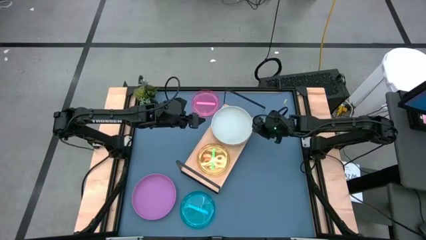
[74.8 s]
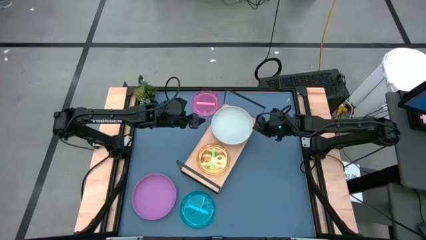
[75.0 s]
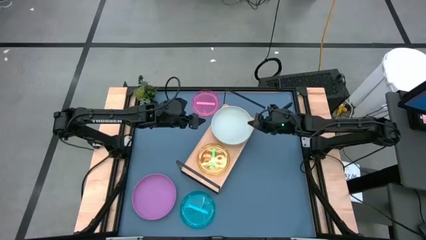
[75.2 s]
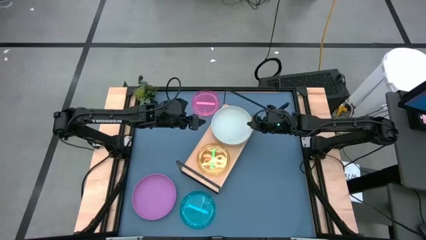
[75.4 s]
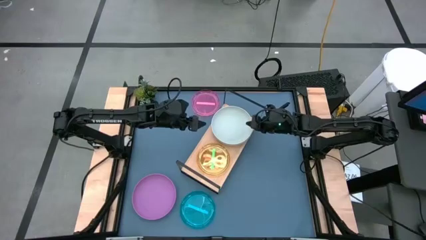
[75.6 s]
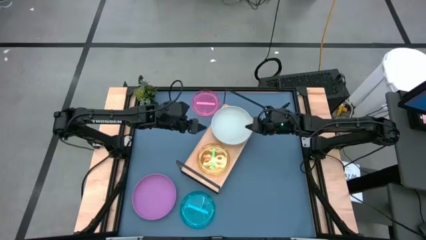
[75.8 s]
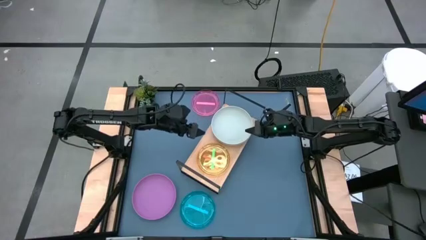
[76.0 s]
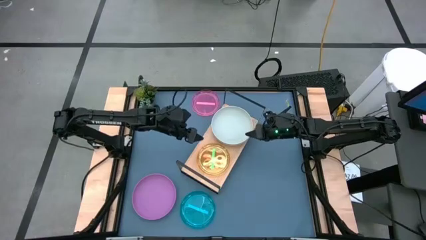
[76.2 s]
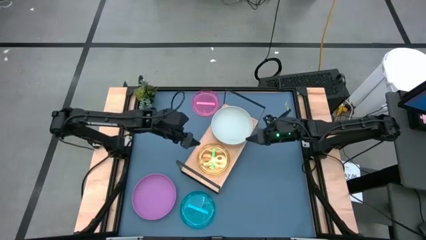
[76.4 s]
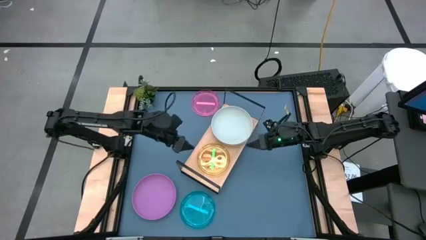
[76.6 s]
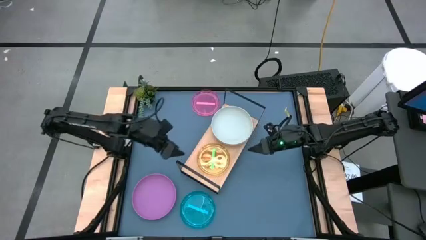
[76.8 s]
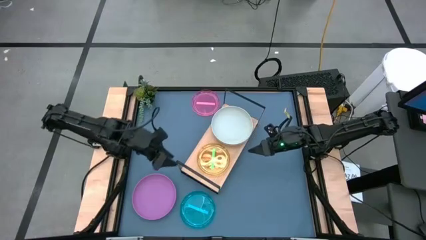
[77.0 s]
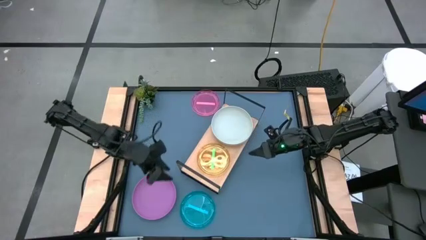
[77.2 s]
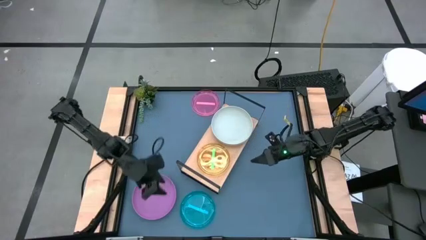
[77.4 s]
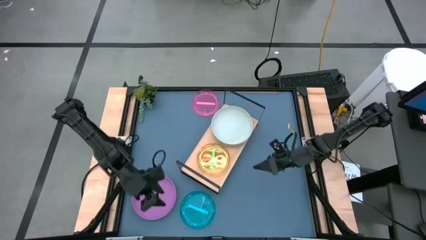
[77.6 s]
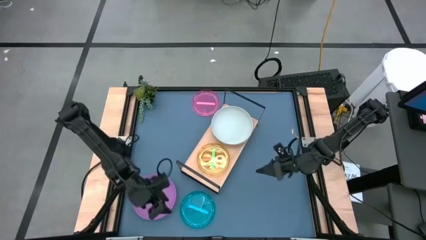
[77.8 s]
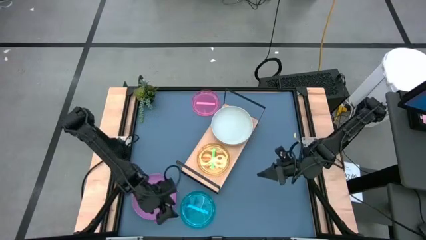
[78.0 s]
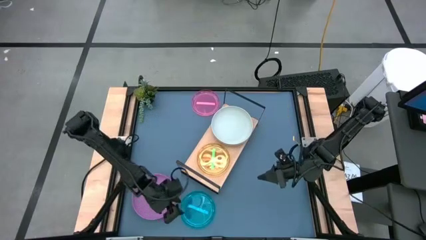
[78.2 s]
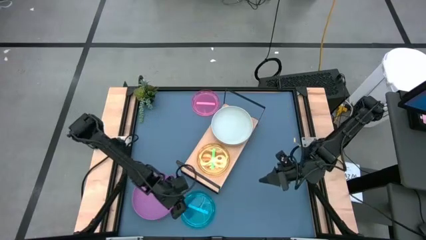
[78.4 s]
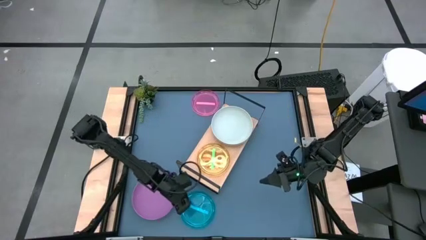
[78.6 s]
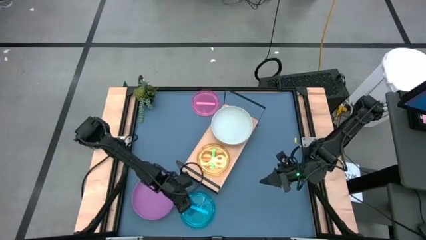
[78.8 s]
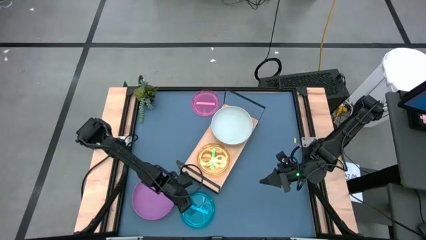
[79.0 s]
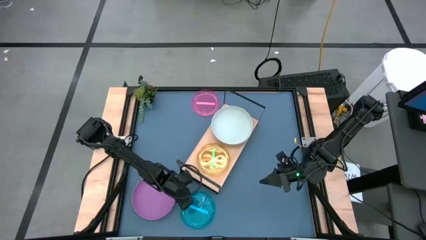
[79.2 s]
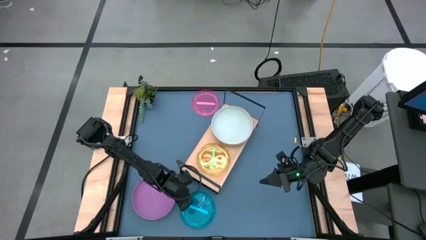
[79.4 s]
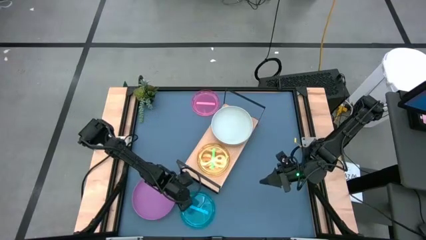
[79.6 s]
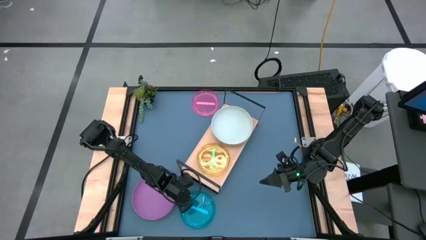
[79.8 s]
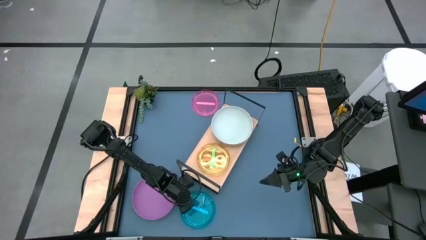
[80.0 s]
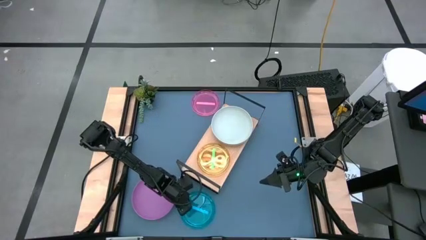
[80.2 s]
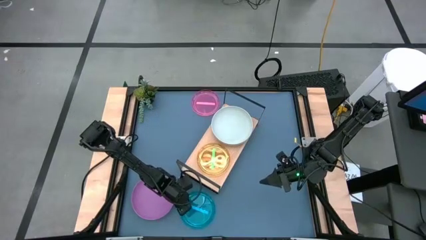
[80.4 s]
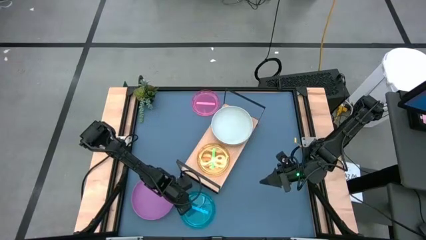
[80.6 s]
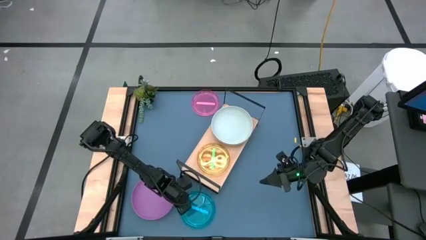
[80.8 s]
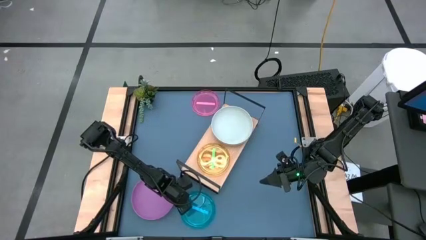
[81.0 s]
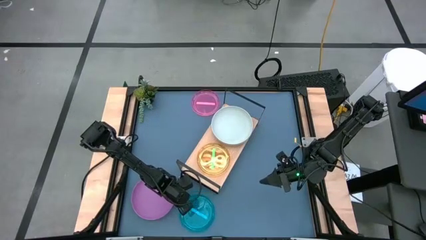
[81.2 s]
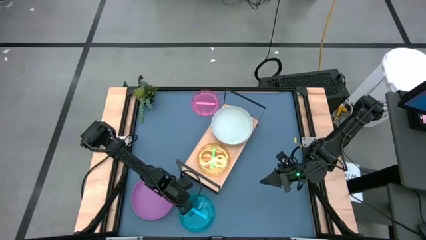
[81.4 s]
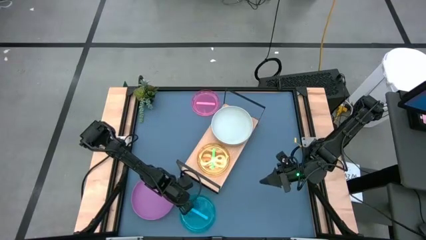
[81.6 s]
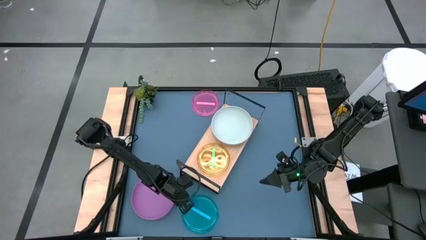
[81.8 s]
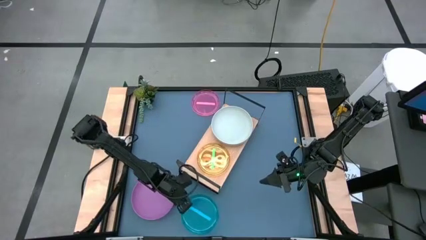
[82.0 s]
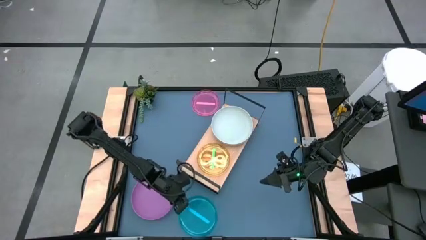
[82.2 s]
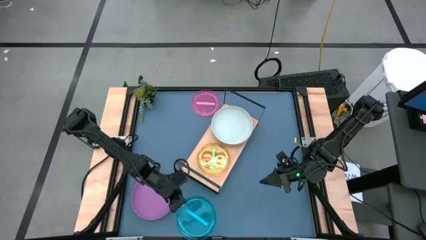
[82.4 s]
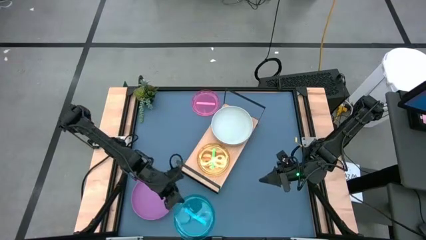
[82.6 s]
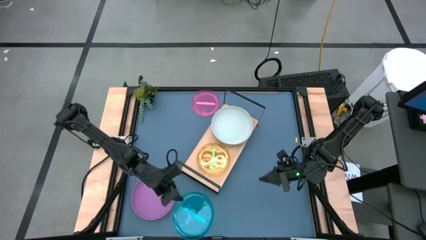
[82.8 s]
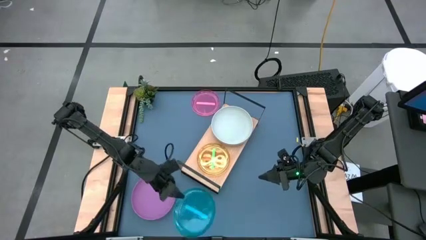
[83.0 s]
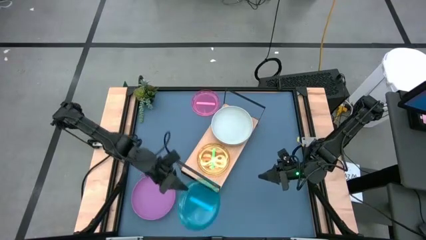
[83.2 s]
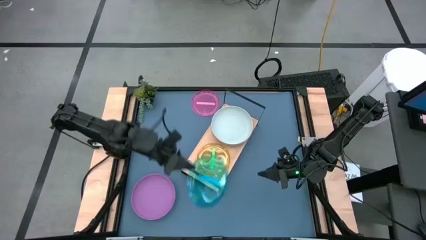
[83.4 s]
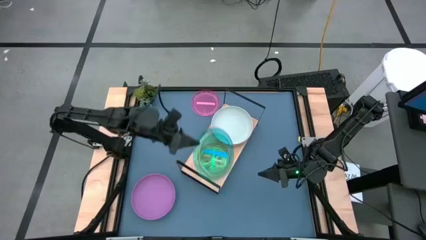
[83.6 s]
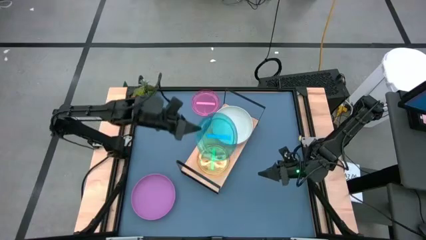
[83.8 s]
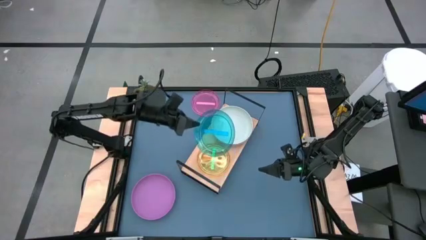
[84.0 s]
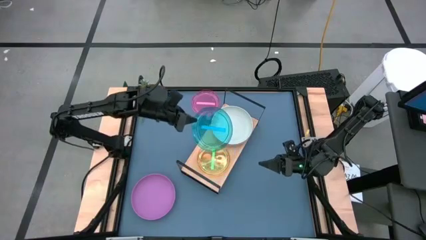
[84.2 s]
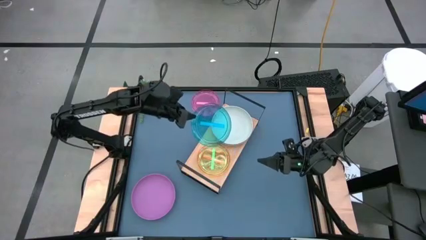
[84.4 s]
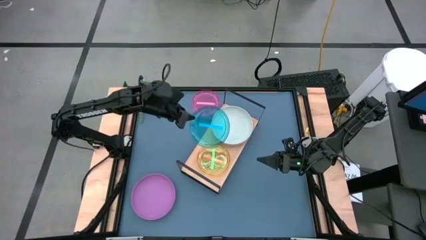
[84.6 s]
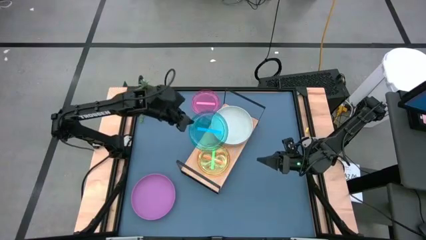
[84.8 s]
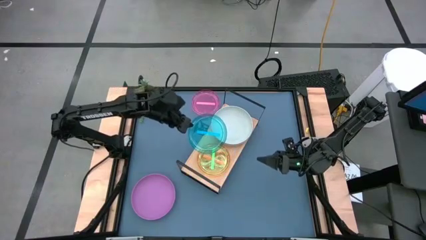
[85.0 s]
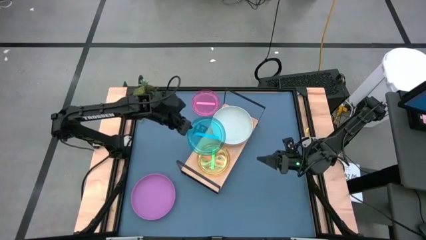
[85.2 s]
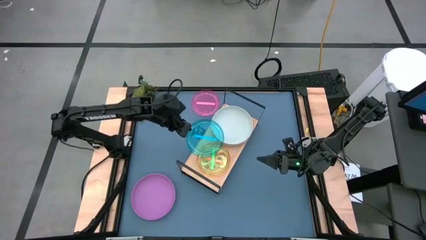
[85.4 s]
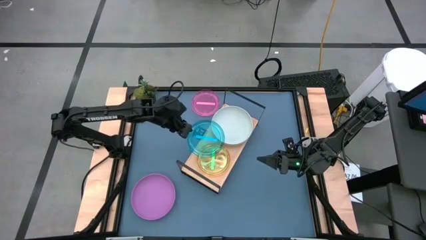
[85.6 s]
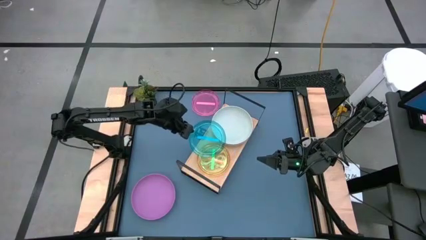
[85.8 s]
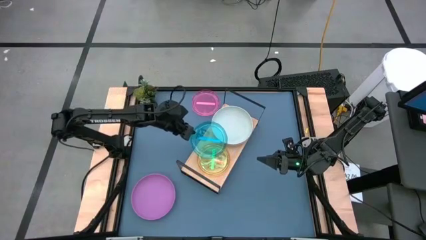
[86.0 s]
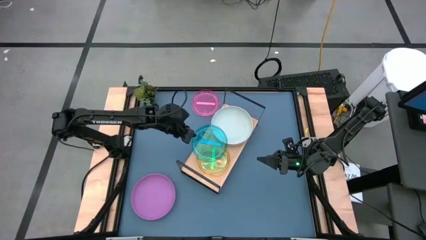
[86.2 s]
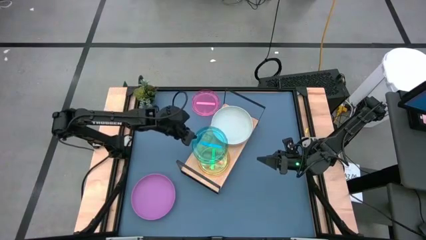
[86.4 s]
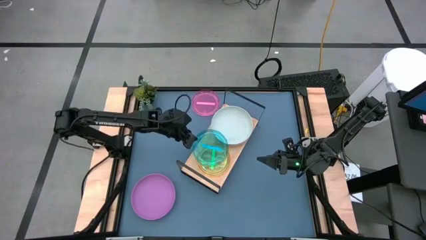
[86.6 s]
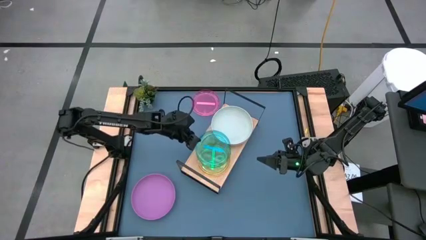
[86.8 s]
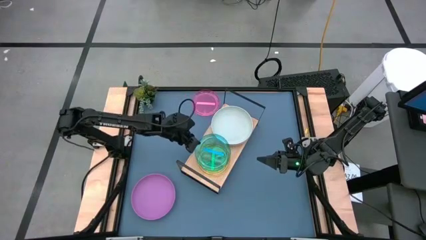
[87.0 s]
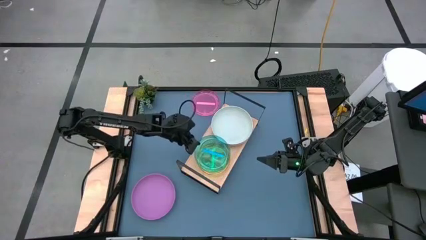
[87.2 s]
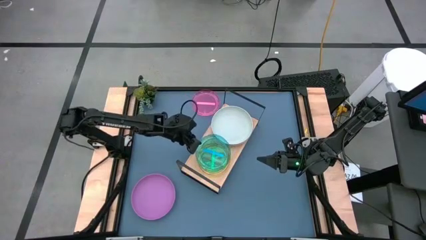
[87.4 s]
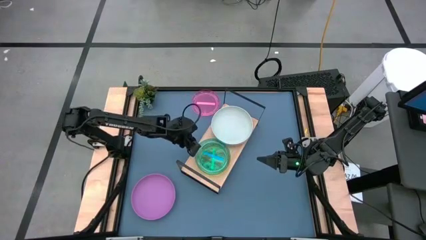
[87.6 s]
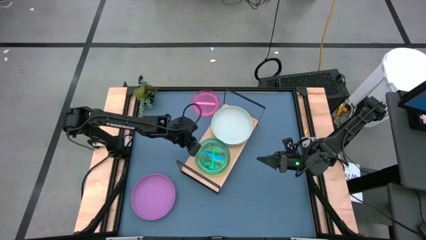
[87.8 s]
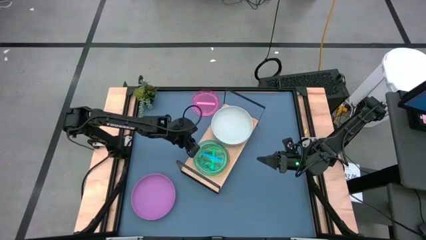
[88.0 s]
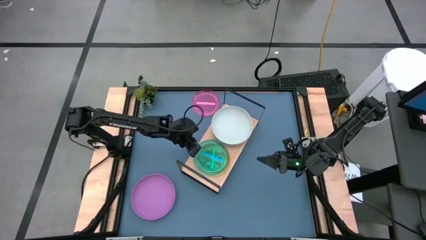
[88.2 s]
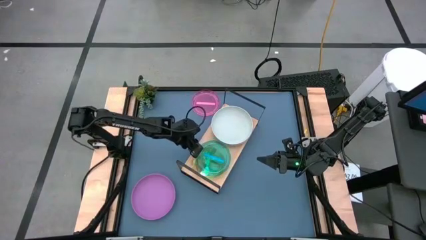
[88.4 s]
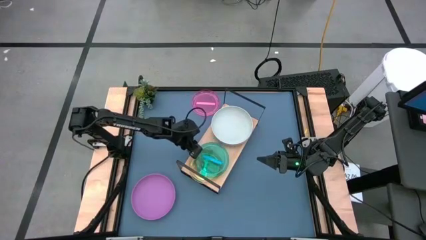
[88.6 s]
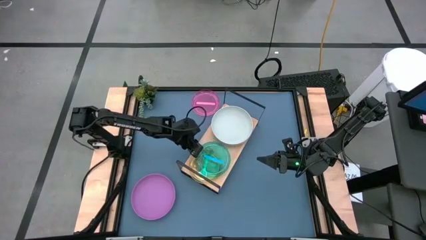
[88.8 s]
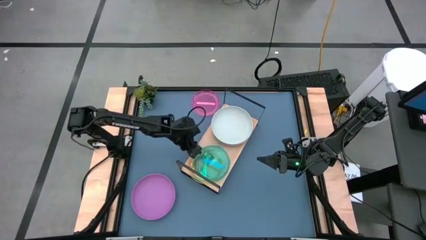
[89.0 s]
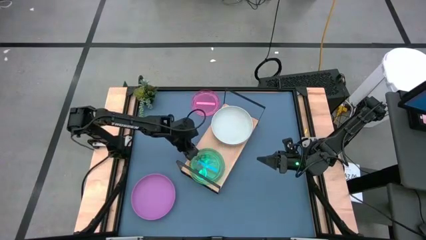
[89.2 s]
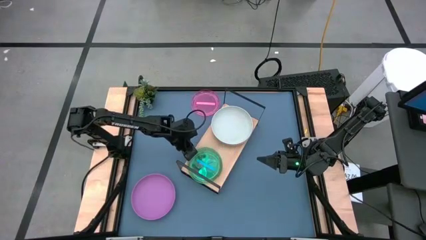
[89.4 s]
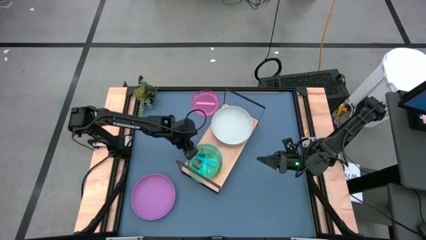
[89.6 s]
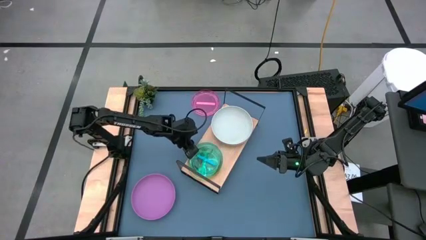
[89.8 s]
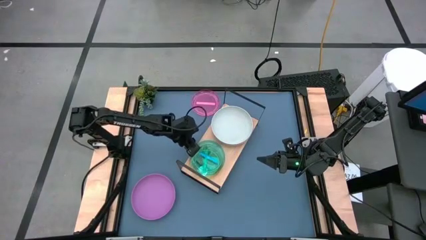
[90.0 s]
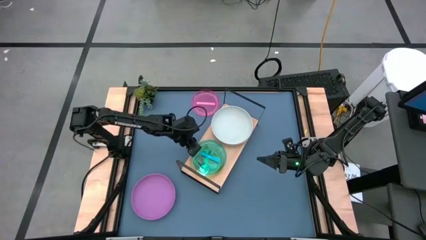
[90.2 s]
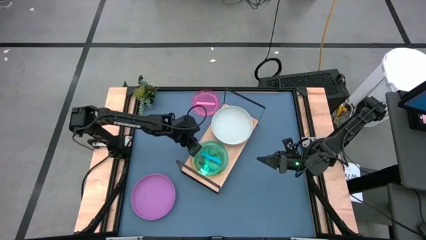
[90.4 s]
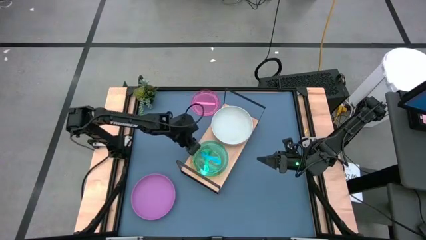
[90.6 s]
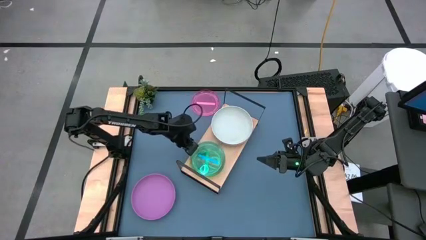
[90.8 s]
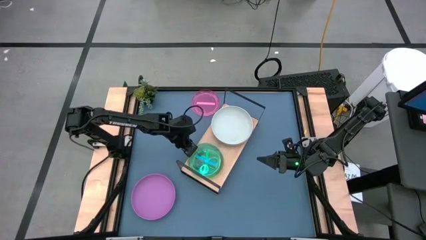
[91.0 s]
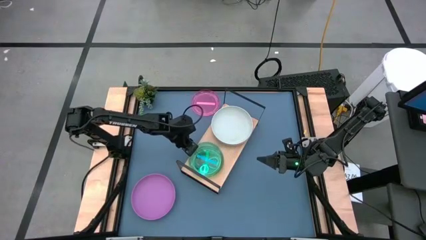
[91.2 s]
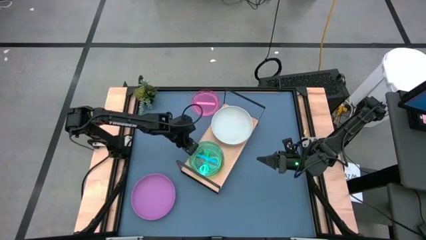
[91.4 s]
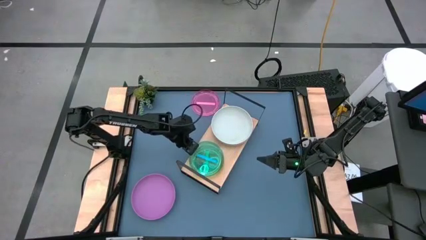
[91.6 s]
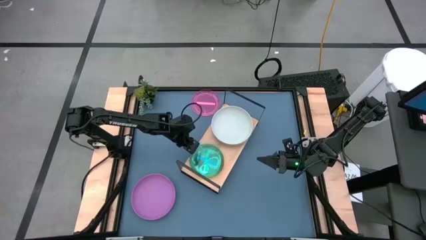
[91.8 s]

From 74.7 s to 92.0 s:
Task: Place and stack plates onto a shelf
Stack the blue plate on top of the green plate on the shelf
